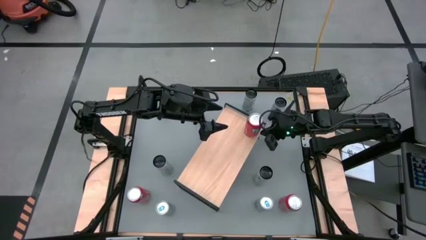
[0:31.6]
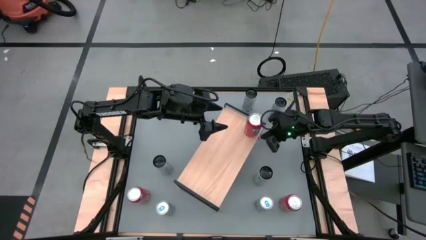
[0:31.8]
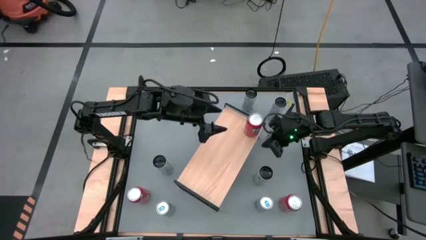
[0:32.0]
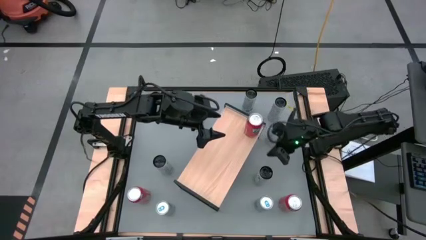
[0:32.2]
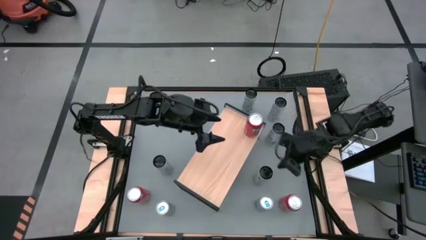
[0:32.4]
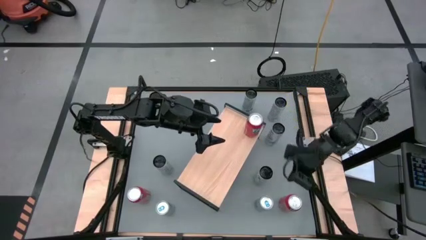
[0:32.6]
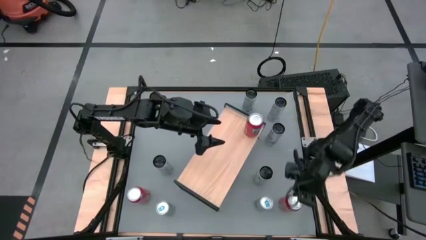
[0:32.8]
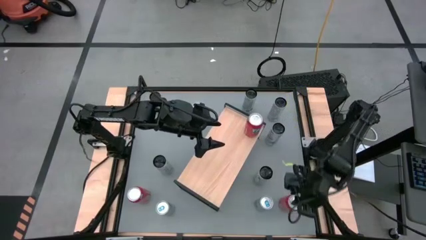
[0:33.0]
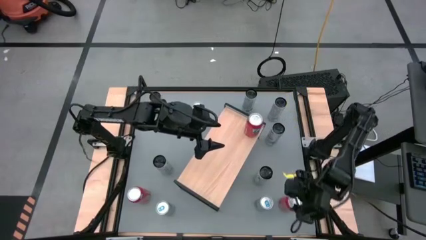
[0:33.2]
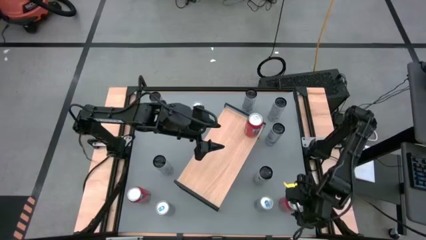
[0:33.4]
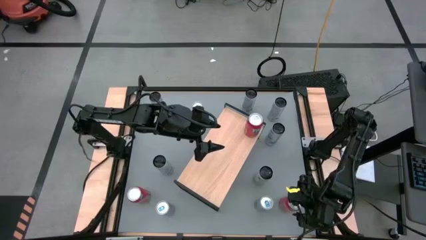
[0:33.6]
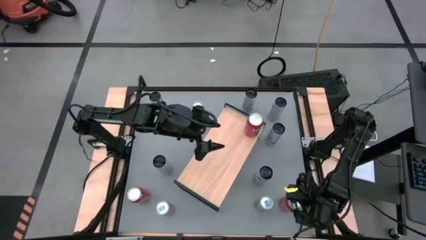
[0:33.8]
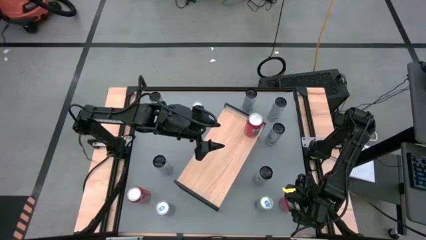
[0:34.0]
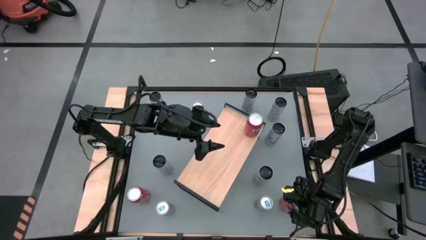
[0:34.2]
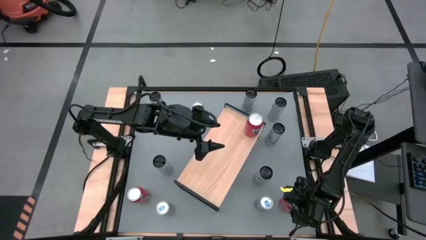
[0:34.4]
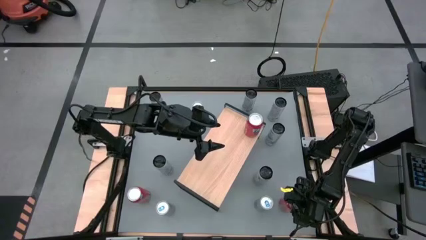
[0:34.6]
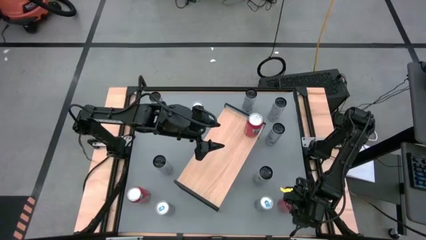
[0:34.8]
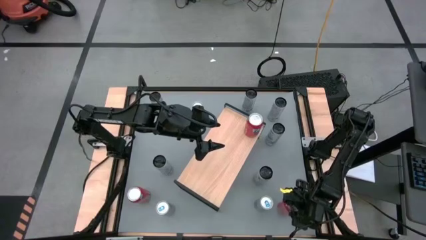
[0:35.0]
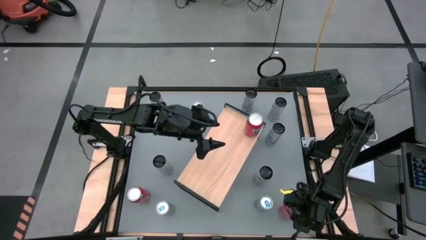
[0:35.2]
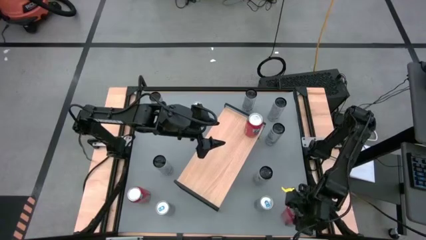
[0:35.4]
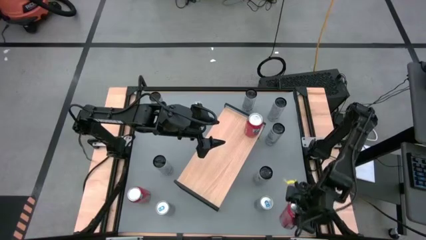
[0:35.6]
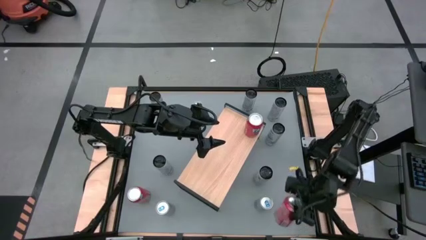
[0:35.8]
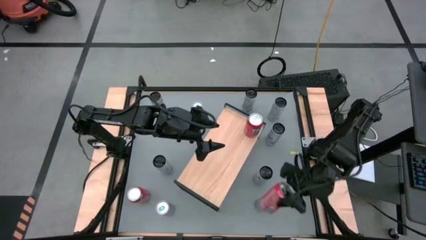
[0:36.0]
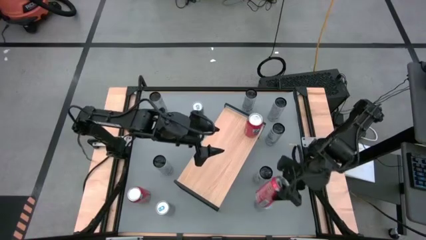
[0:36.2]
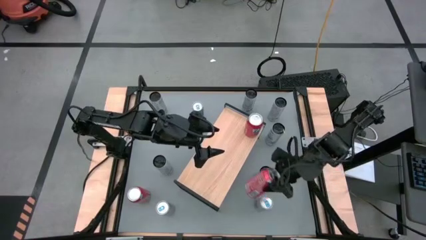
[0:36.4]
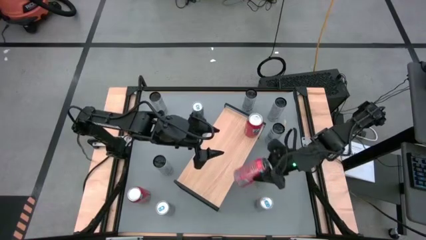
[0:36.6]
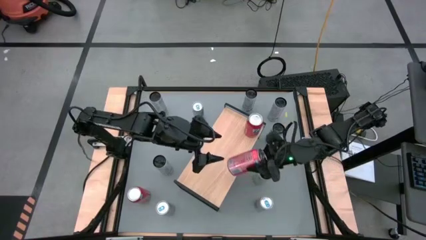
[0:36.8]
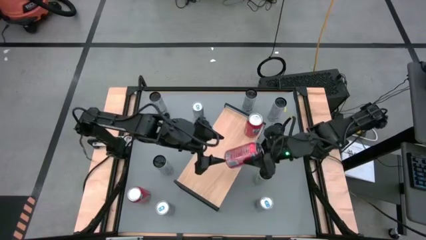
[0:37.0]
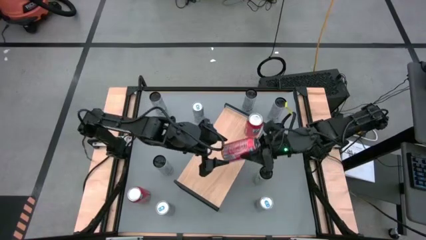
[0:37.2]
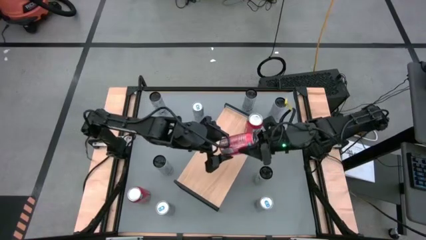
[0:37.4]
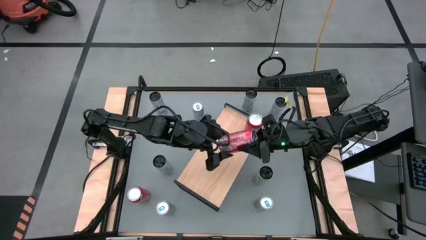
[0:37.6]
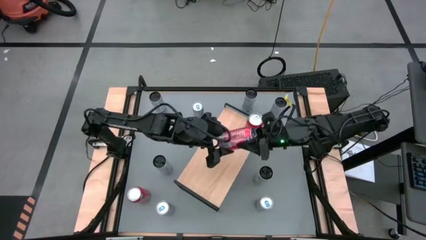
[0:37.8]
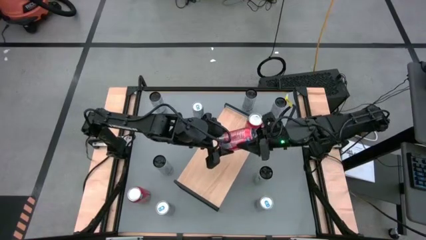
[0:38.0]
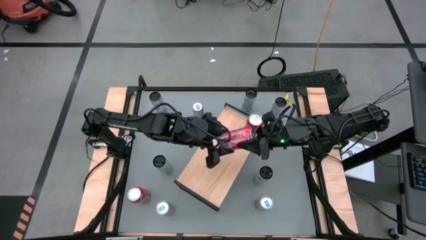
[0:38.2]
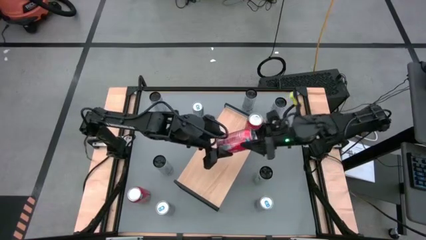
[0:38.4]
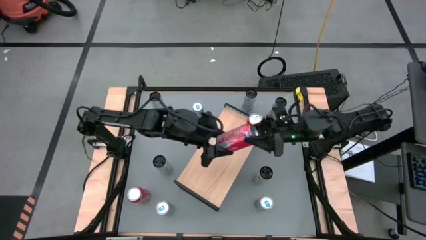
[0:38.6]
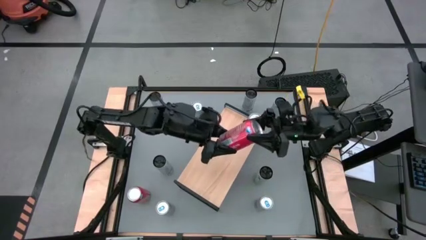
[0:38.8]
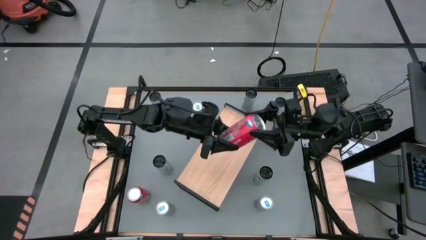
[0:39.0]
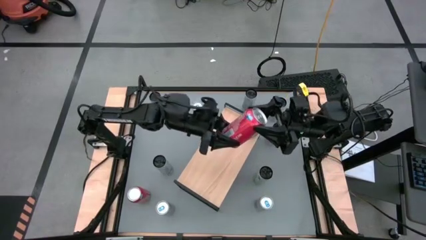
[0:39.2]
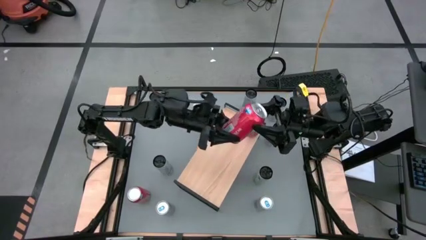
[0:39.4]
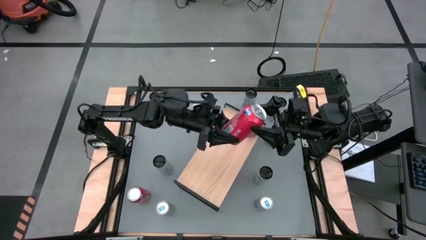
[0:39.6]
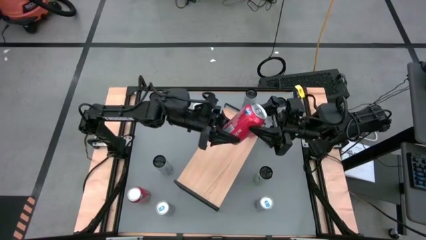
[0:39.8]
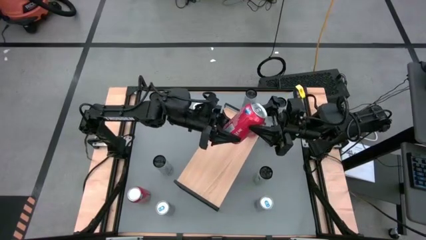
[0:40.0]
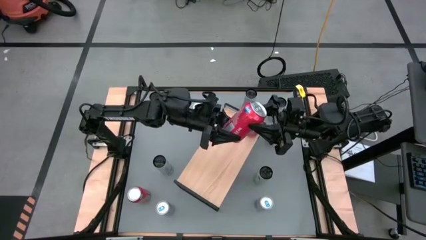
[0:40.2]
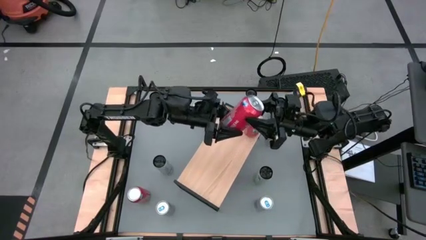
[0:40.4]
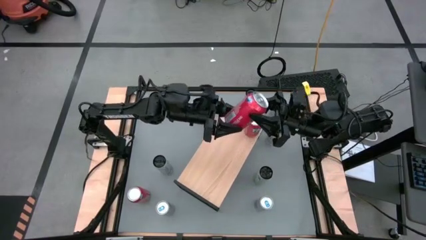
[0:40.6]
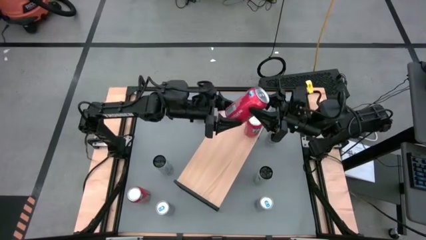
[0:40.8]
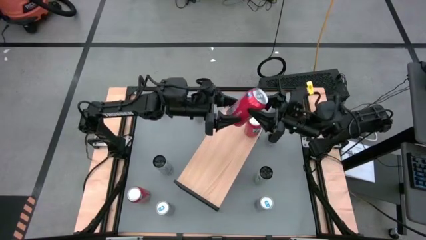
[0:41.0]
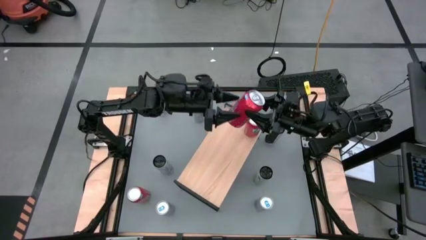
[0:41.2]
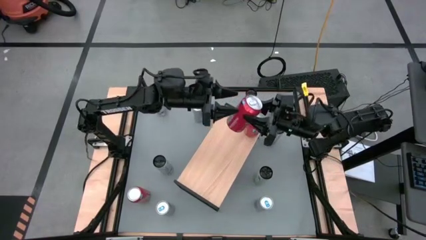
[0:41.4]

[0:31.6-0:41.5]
Task: Place canned beverage on shelf
Put the red soda can on the shelf aligned with the other red soda can
